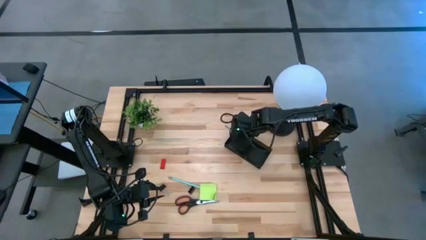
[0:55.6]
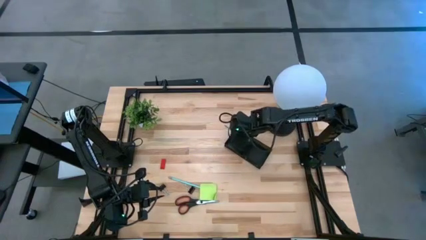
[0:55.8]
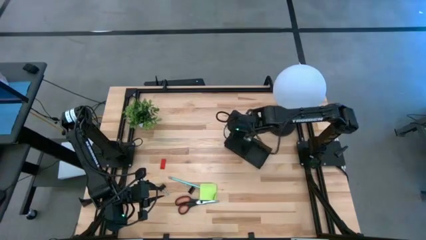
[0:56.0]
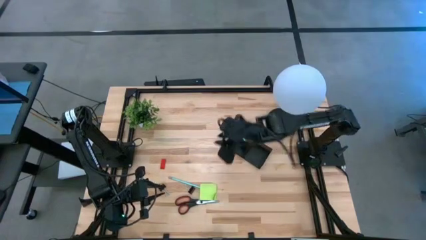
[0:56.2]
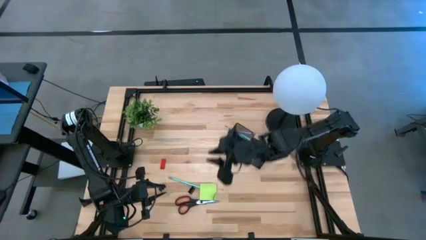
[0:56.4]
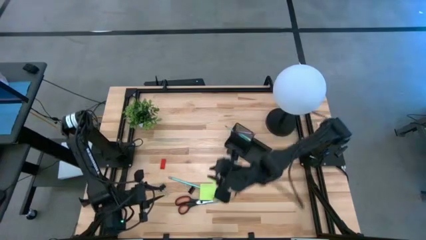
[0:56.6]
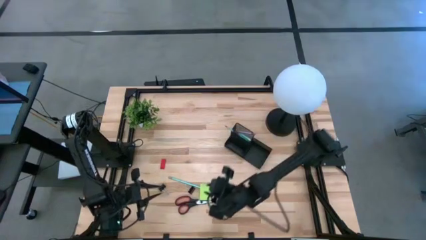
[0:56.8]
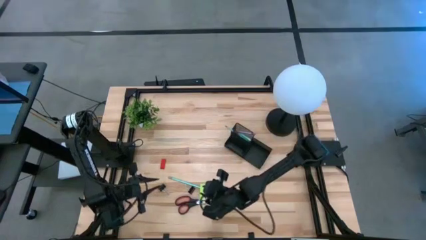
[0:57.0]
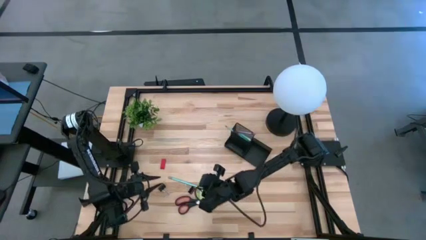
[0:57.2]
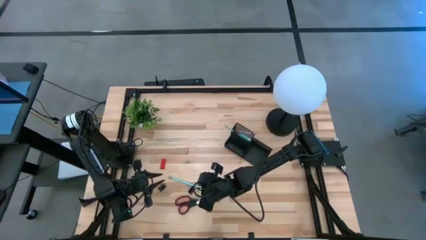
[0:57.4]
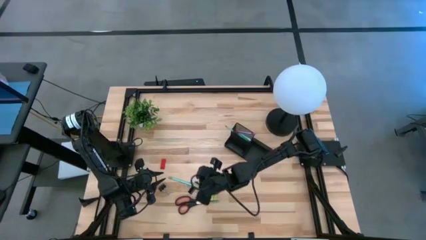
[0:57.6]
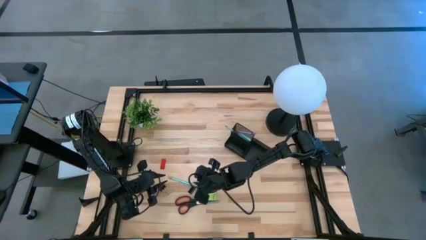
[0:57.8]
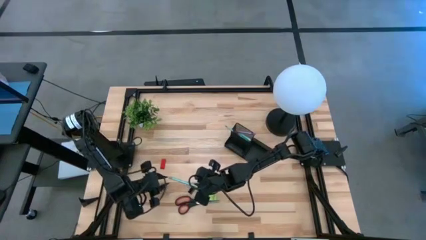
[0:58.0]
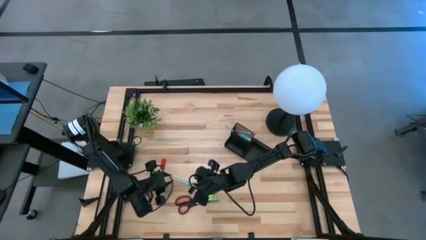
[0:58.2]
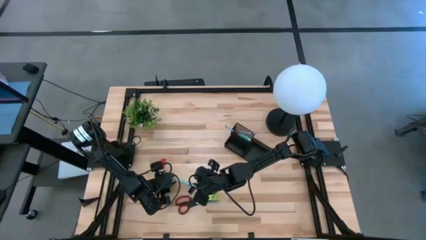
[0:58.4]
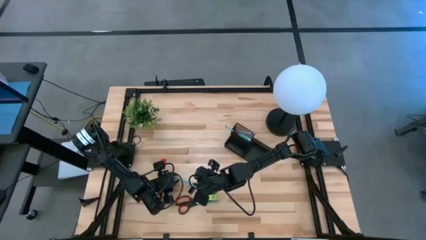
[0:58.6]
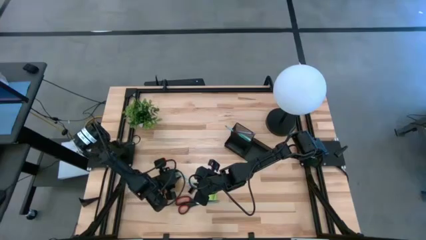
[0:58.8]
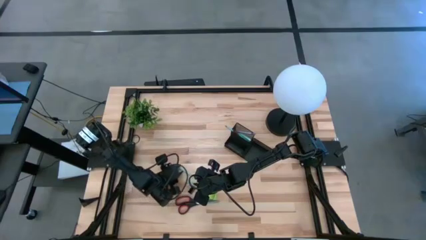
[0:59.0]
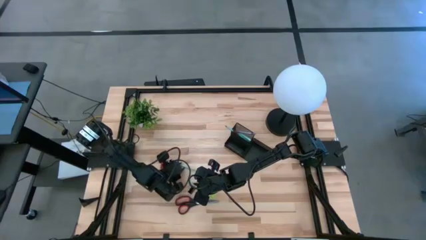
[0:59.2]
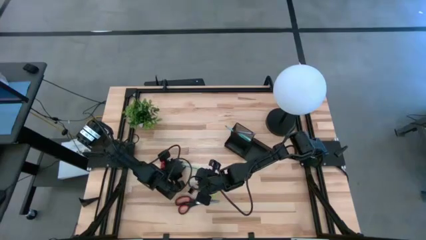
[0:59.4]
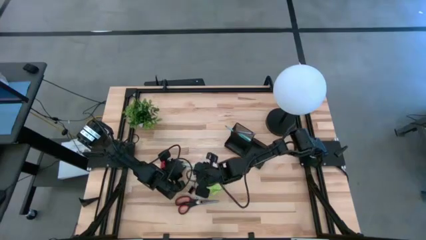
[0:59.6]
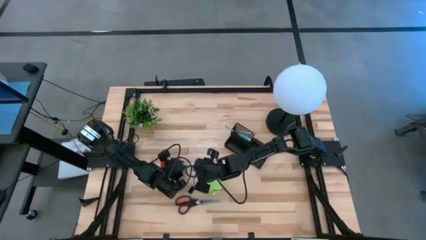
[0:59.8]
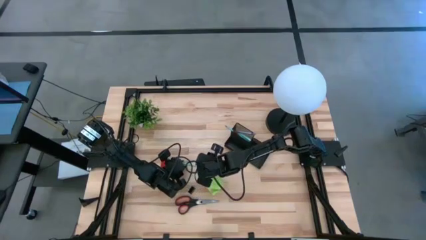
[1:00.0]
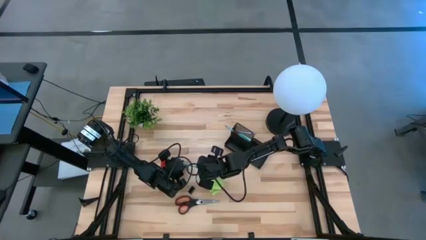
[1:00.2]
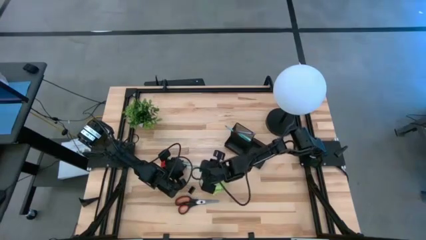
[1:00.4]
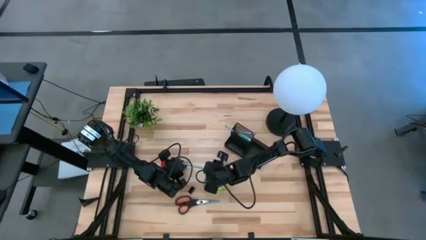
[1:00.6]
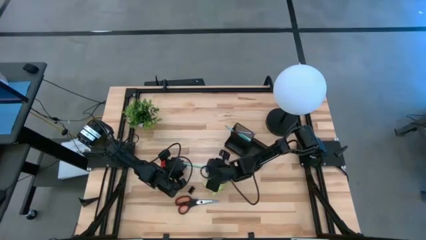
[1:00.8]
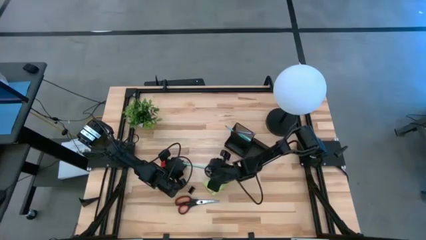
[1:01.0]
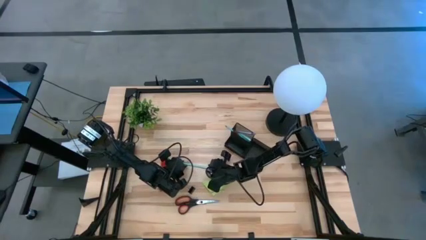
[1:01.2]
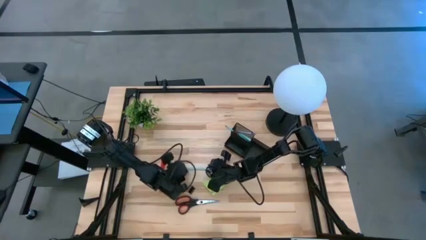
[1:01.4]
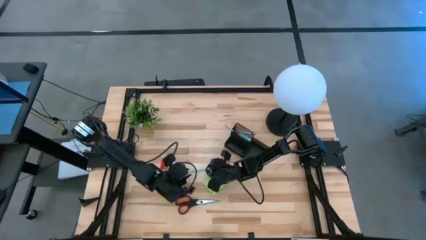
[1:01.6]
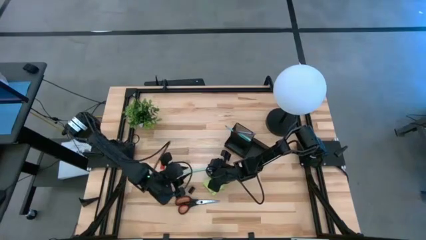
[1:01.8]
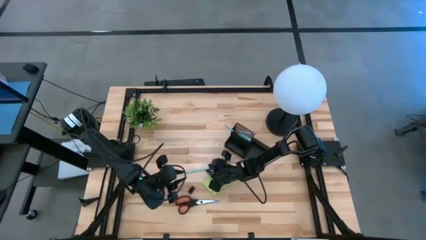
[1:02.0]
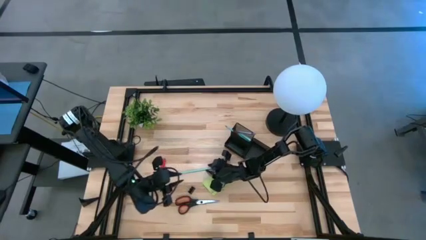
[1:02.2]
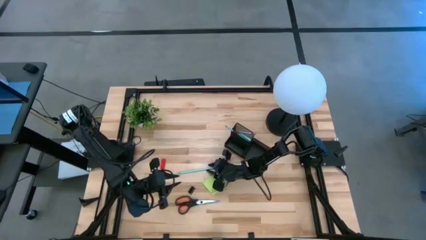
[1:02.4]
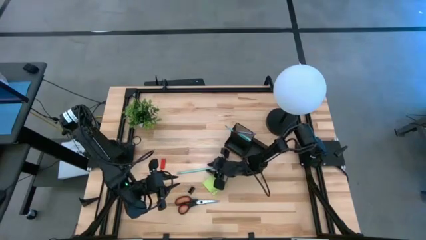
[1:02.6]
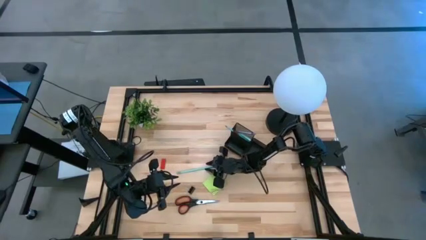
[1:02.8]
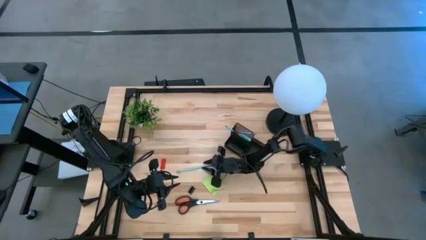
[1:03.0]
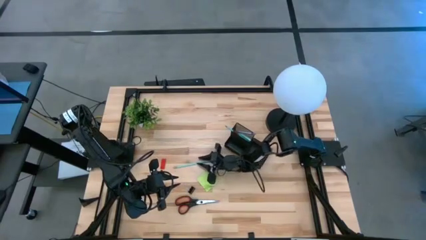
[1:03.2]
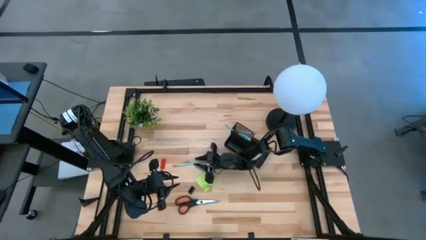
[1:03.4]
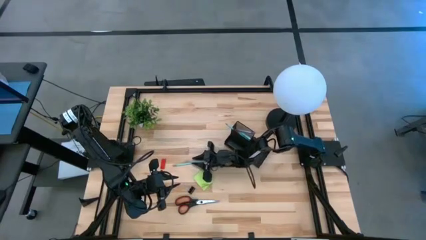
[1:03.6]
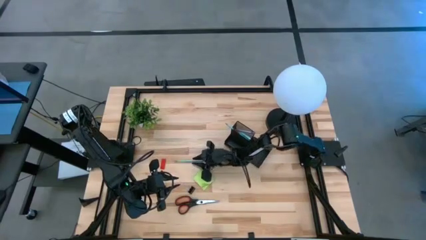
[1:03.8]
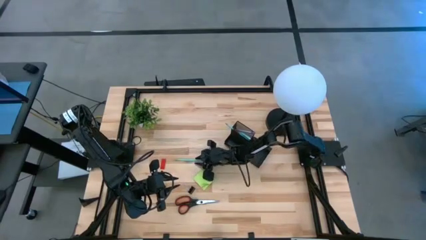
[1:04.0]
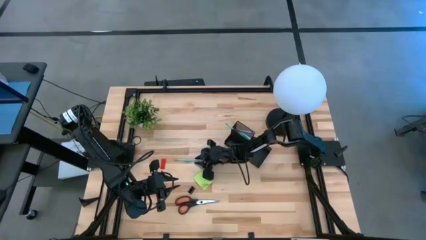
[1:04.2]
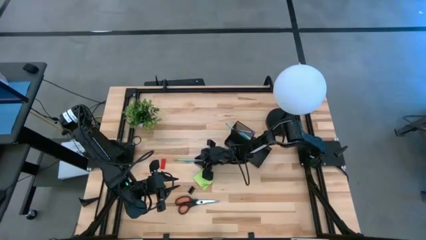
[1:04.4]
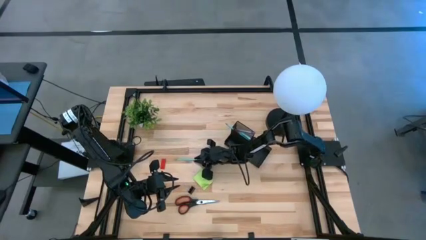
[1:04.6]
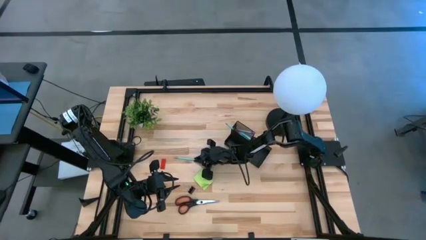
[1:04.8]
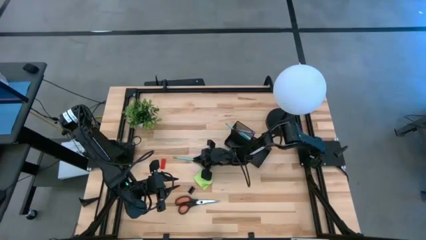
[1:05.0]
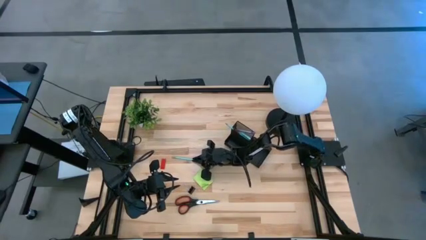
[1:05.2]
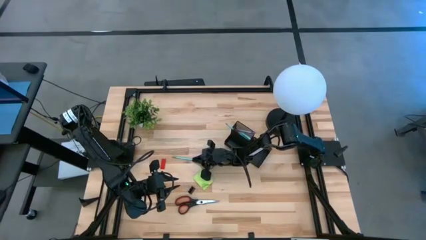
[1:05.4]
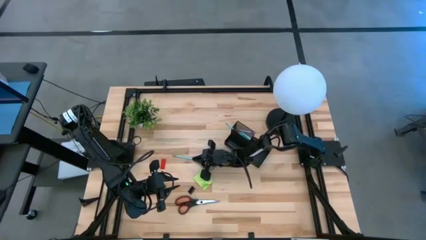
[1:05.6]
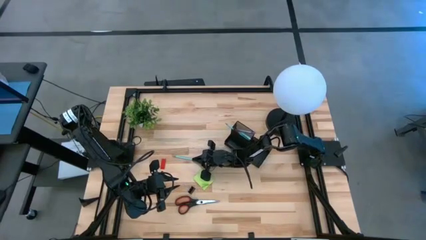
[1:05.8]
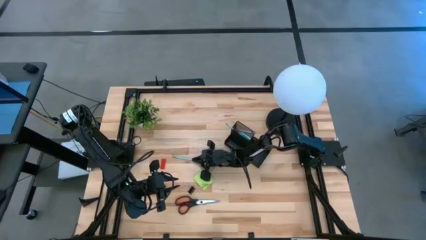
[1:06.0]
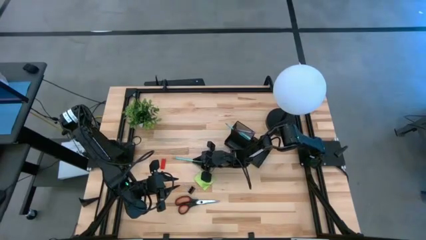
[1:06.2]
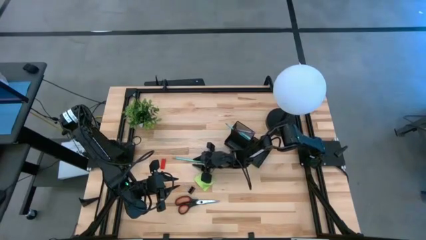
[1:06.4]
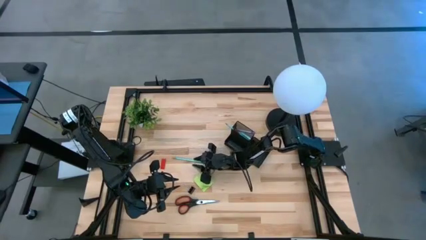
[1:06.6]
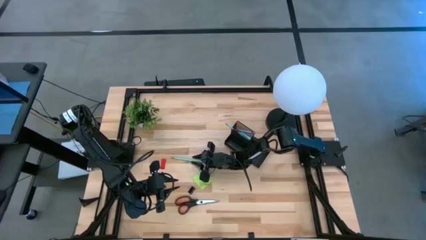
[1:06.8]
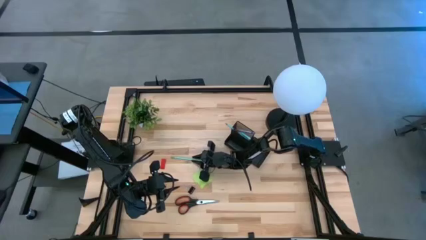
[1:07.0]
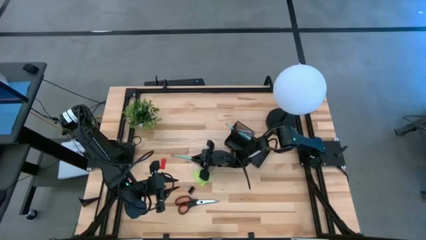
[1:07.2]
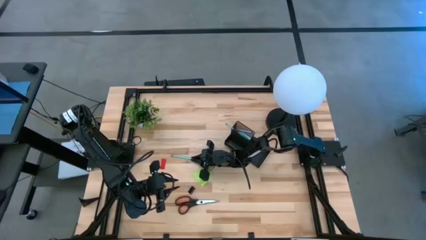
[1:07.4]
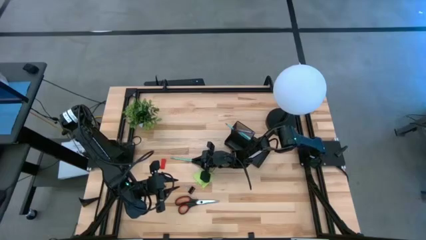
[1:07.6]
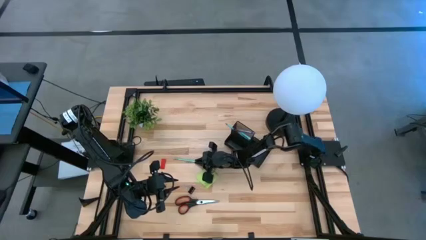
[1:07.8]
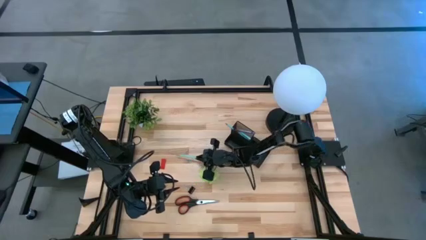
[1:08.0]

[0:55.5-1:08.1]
Task: Pick and place office supplies into organizer
Put the blue pencil into the desk organizer

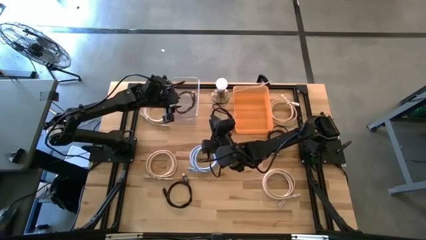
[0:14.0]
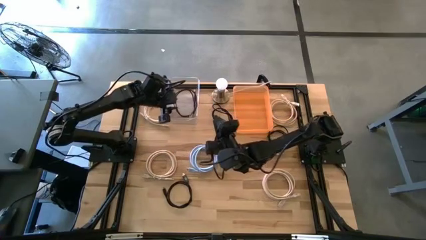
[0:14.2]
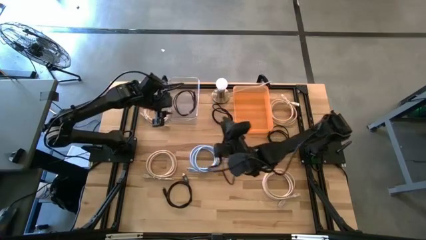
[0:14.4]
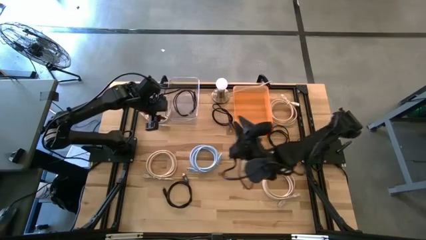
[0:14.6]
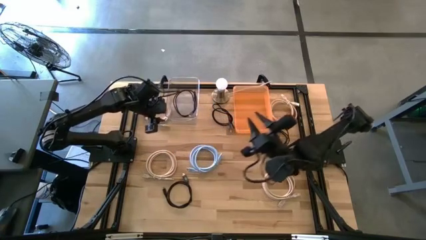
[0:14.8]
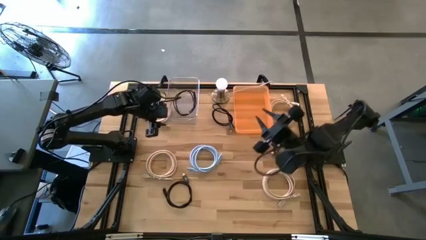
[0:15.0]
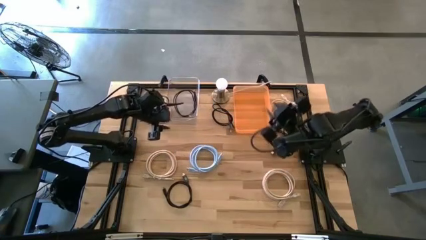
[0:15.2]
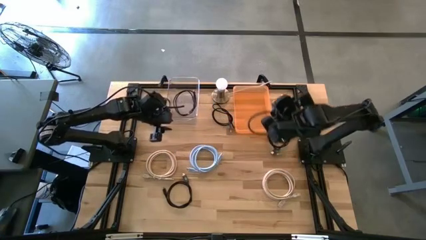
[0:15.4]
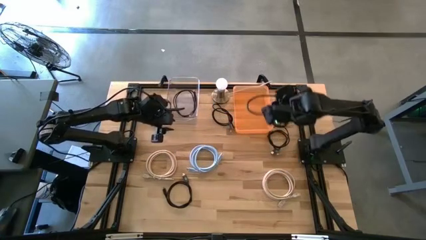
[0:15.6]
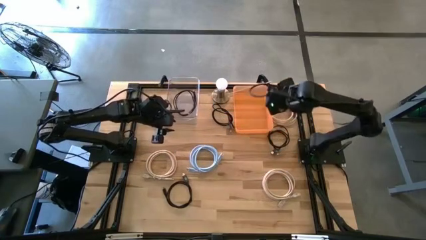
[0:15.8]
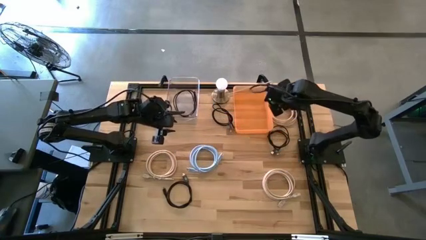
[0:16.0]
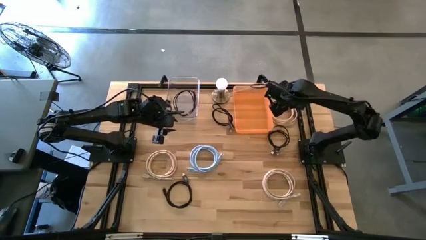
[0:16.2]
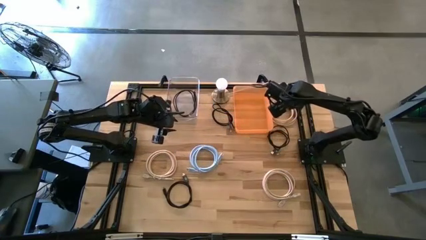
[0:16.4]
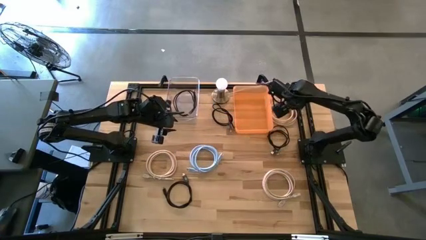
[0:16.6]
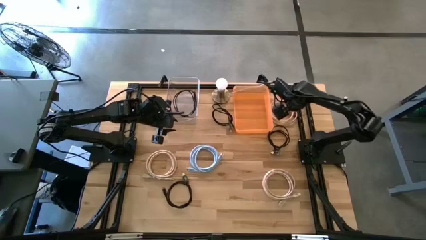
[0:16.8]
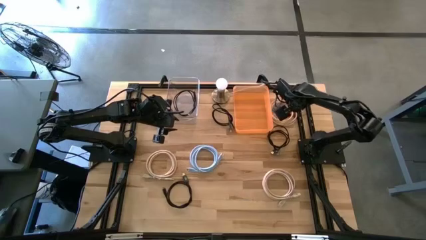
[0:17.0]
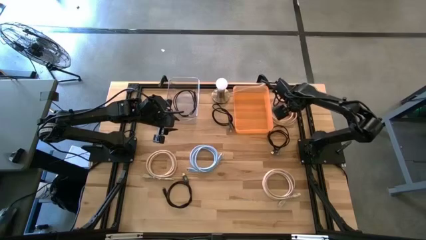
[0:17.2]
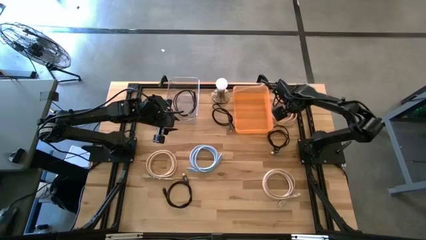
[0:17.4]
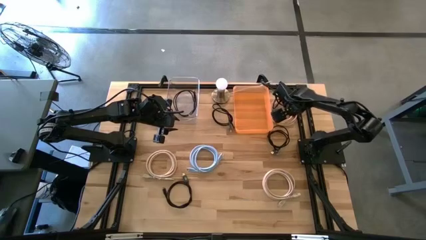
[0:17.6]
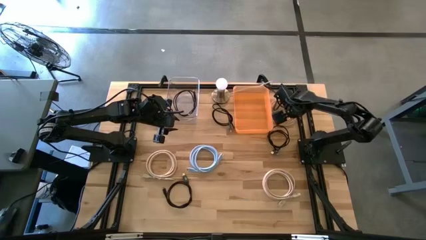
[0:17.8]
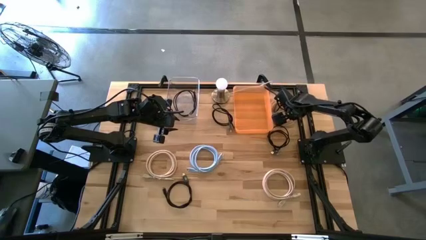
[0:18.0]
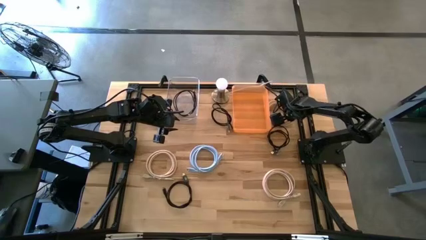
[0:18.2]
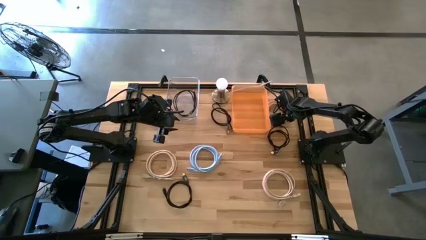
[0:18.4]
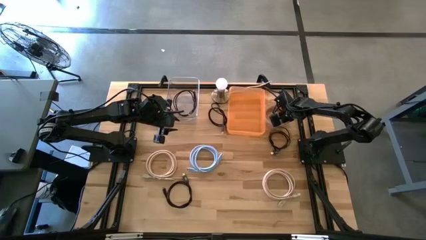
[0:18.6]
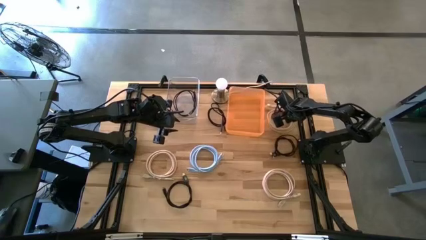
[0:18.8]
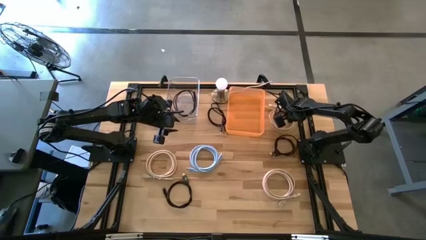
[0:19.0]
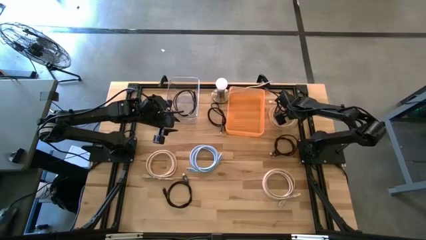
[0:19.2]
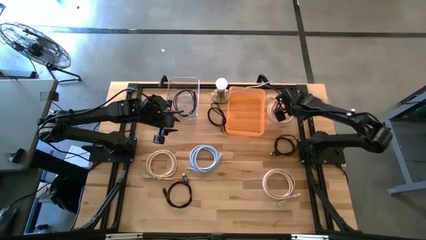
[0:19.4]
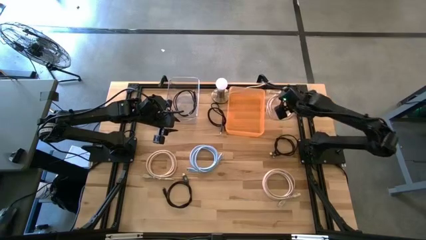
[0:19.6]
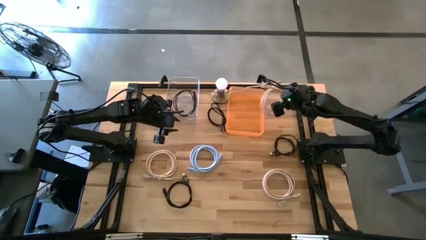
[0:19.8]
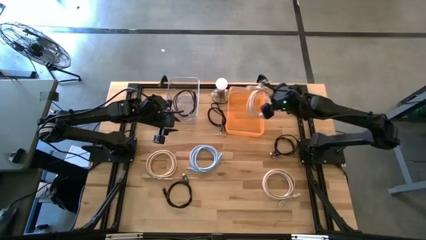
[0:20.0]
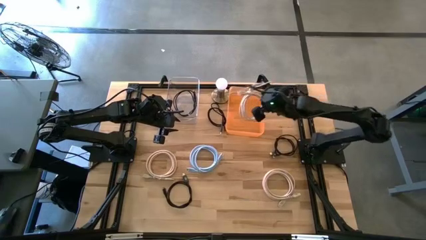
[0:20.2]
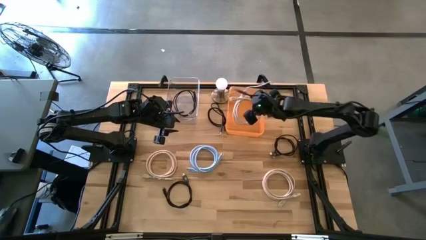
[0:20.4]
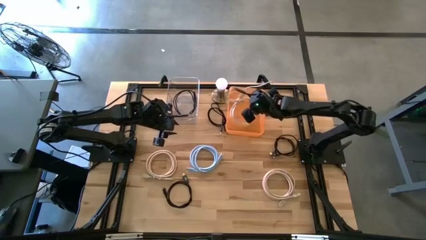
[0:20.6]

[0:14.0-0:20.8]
Task: Pick & Place USB Port
Put the light brown charger cable into the orange bin
